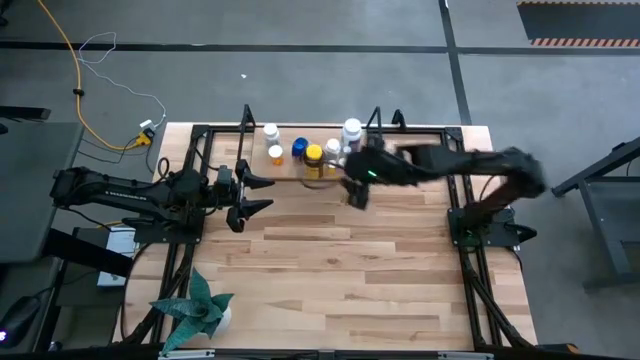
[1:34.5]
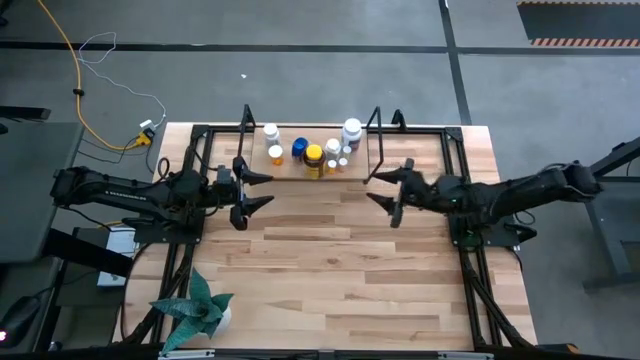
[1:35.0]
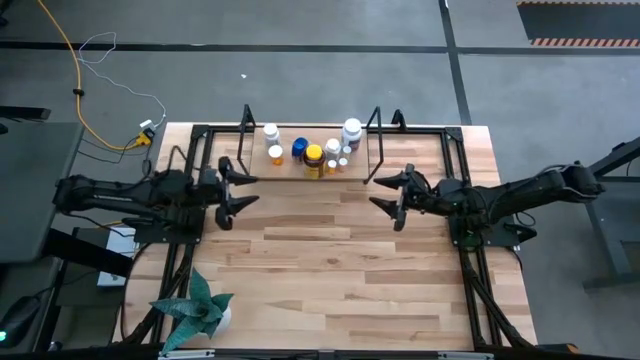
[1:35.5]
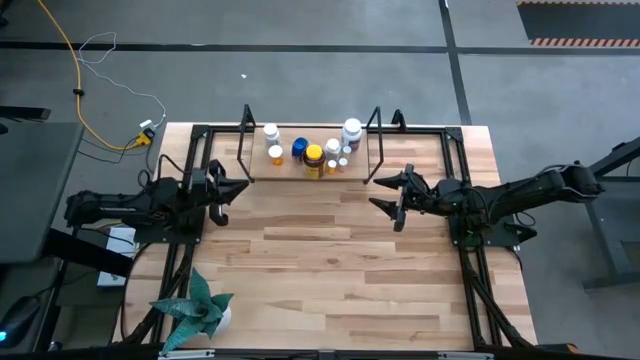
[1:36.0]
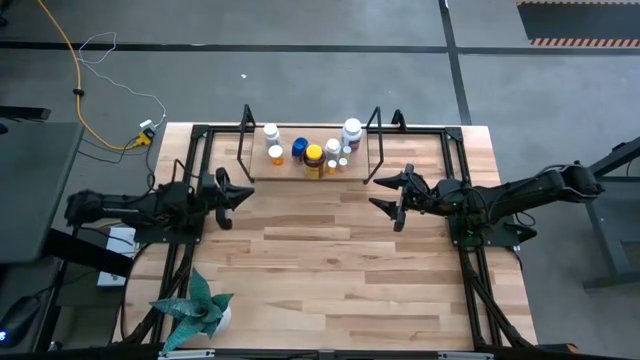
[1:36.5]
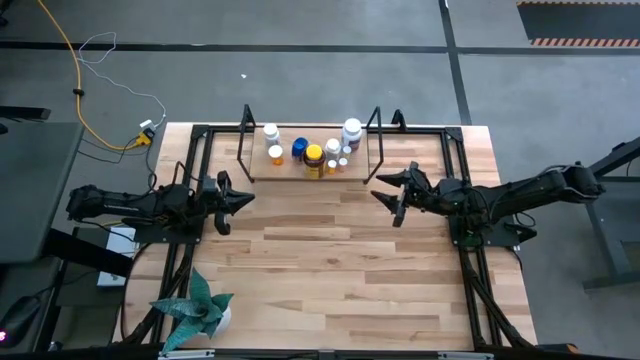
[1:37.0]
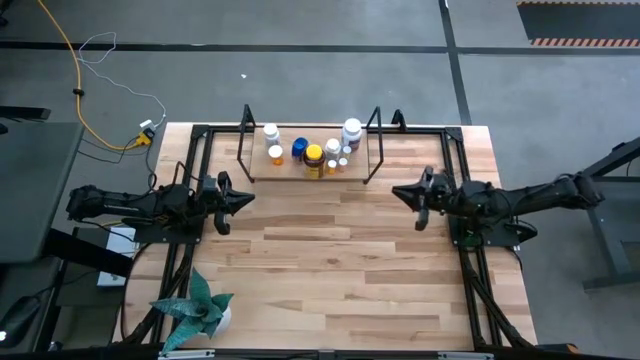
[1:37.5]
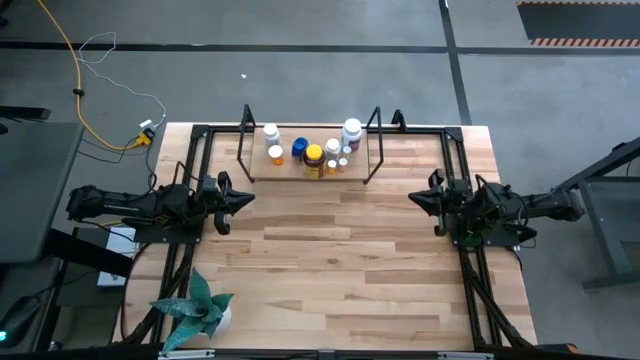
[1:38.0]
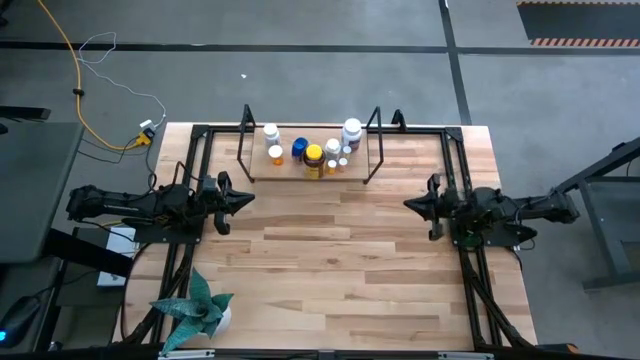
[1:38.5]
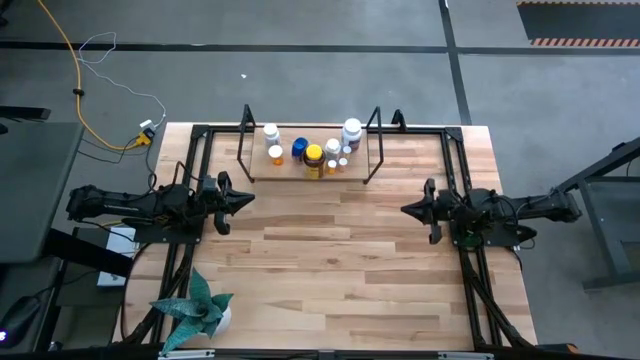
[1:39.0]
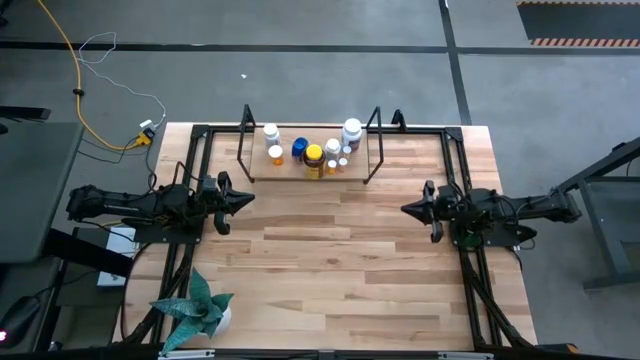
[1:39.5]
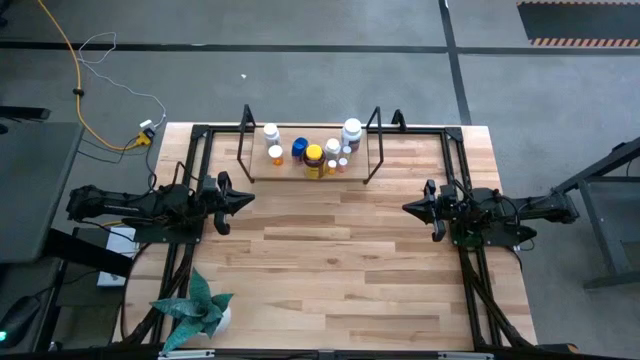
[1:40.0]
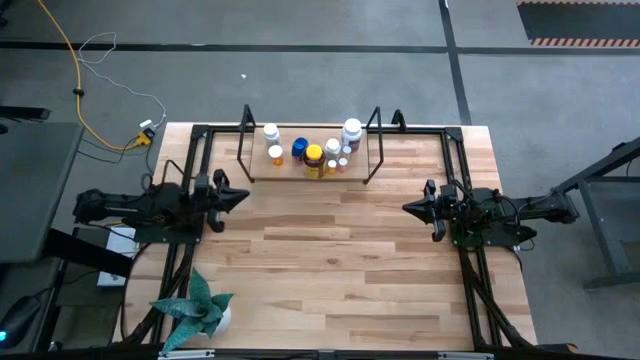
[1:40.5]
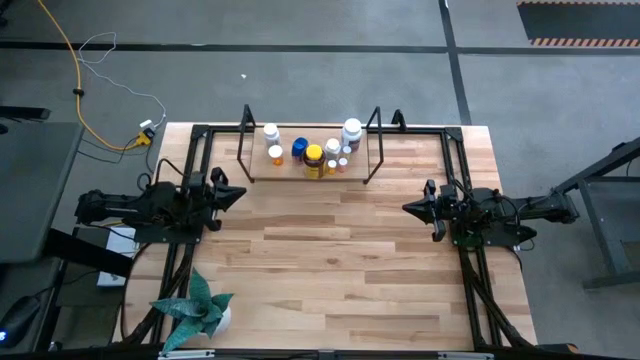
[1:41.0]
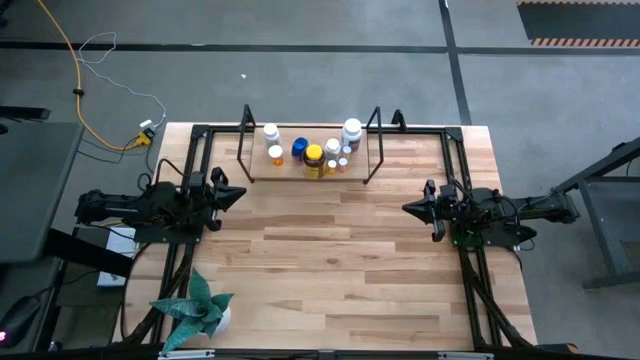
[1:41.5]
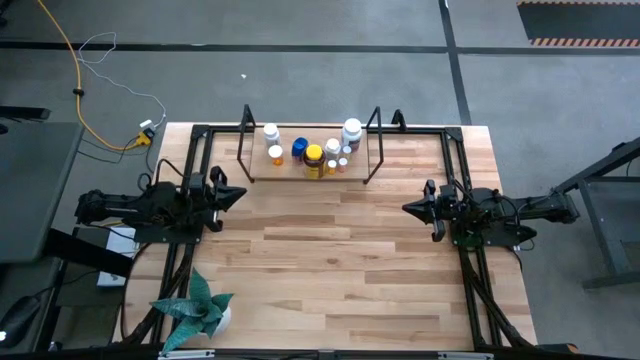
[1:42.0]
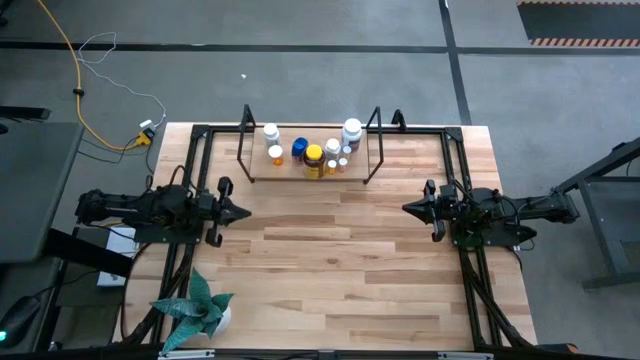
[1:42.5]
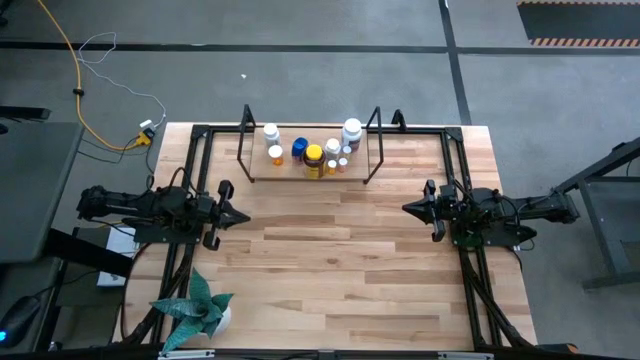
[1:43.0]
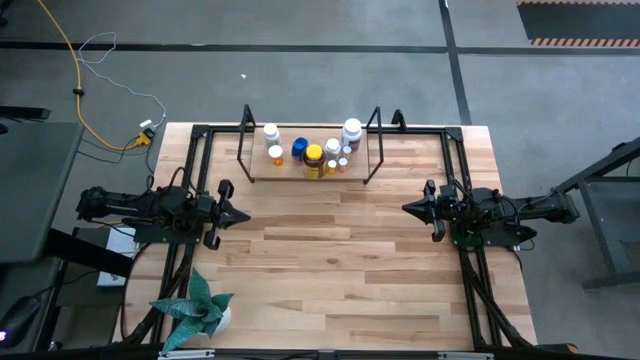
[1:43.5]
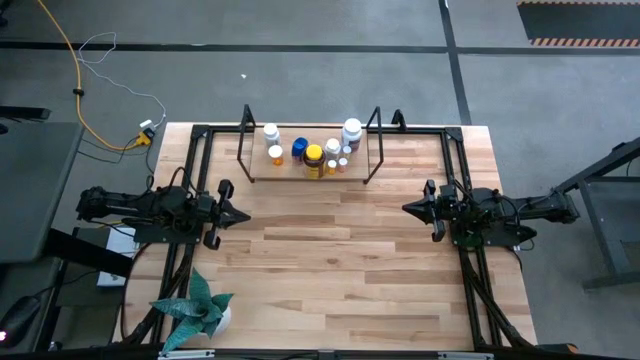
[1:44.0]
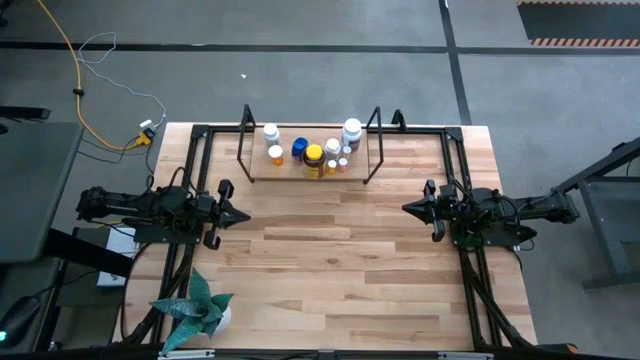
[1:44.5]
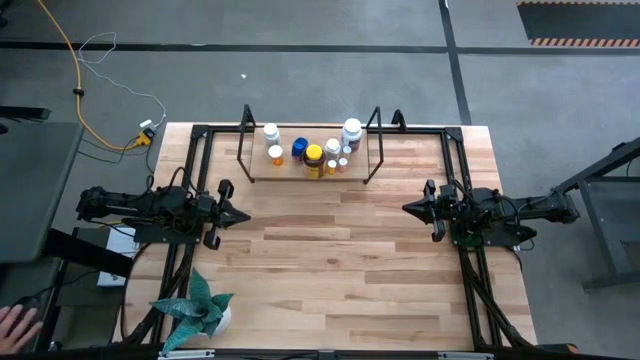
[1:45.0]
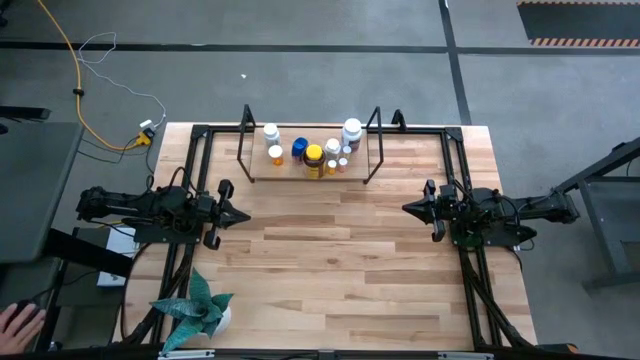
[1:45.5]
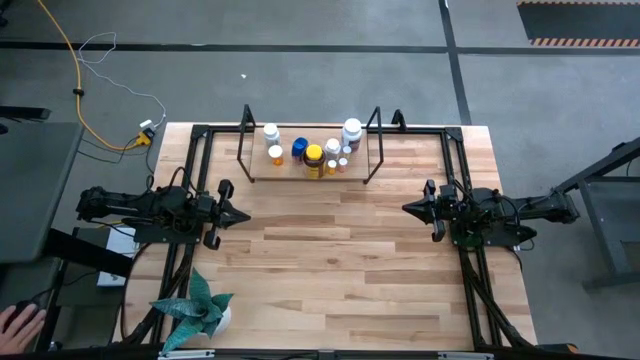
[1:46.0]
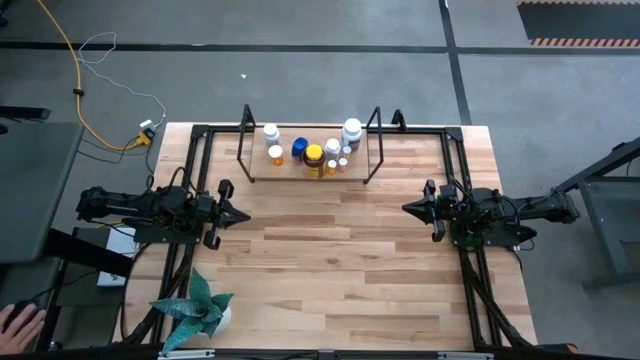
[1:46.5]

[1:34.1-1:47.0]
Task: Pick and place medicine bottles onto shelf by color
Return to Home Position

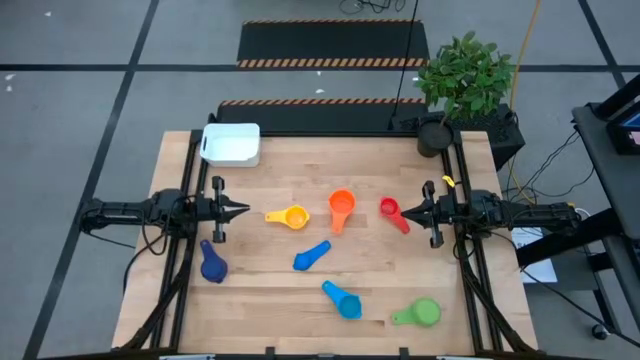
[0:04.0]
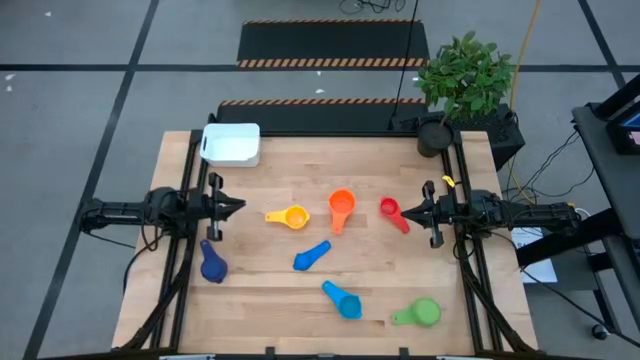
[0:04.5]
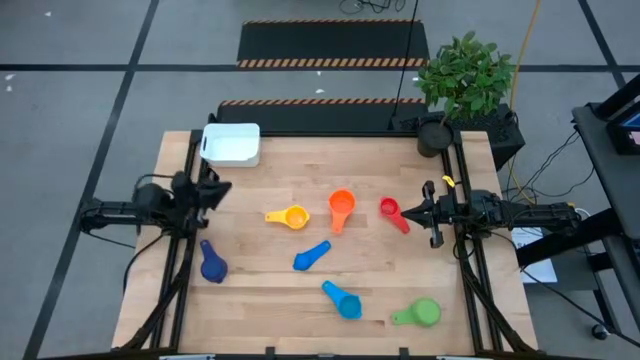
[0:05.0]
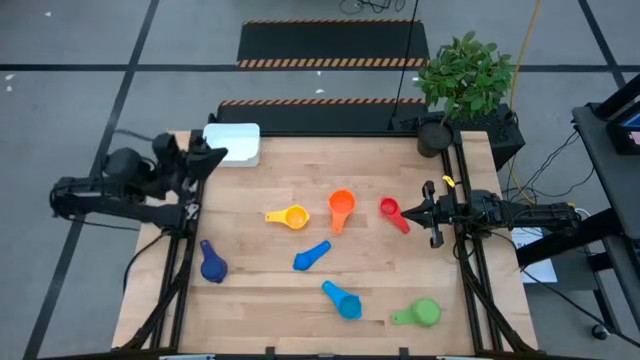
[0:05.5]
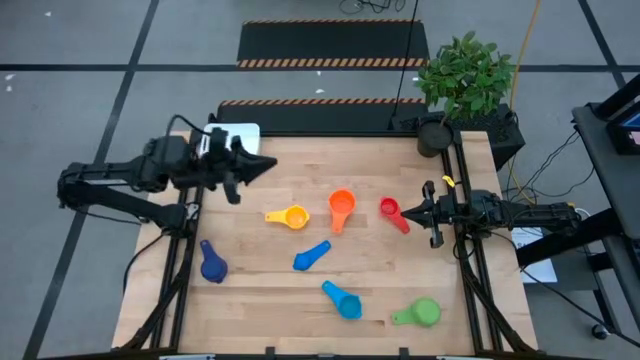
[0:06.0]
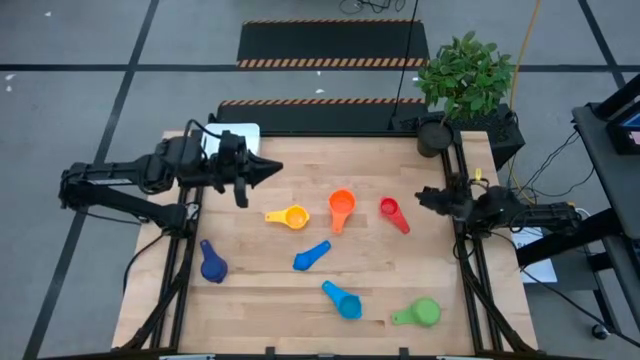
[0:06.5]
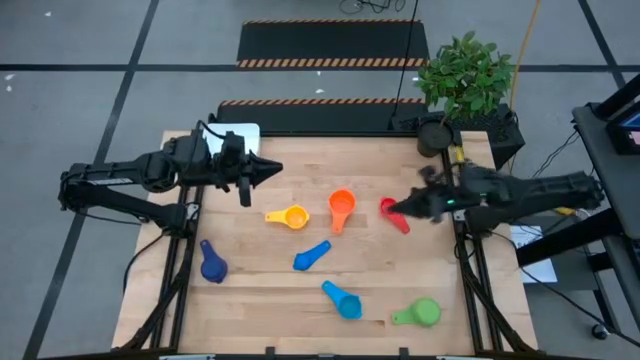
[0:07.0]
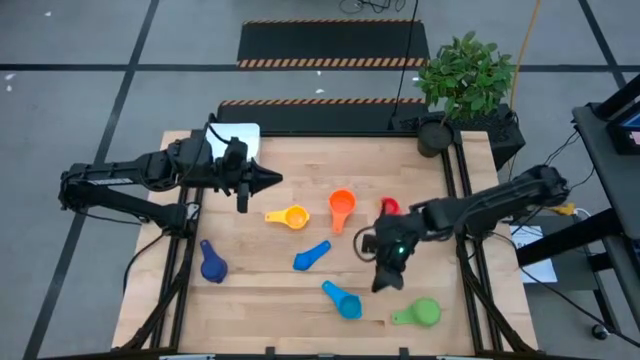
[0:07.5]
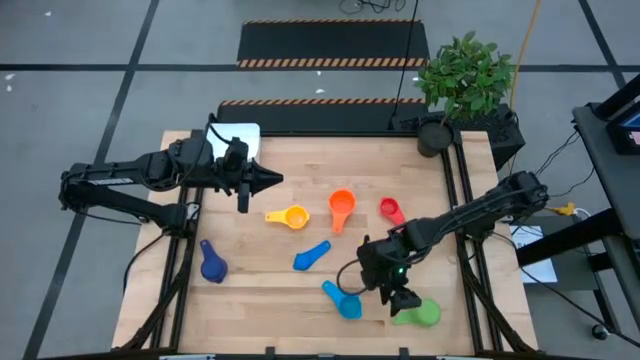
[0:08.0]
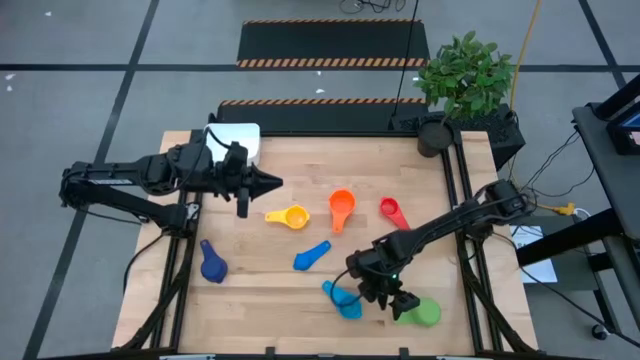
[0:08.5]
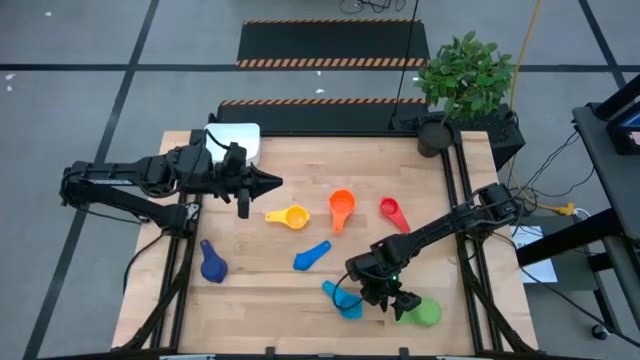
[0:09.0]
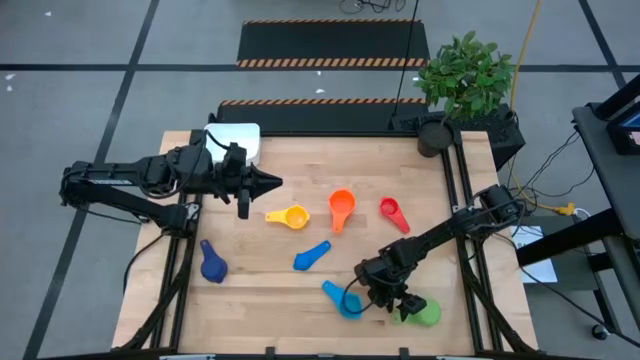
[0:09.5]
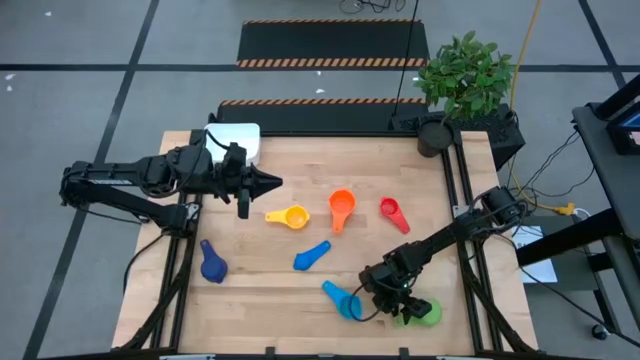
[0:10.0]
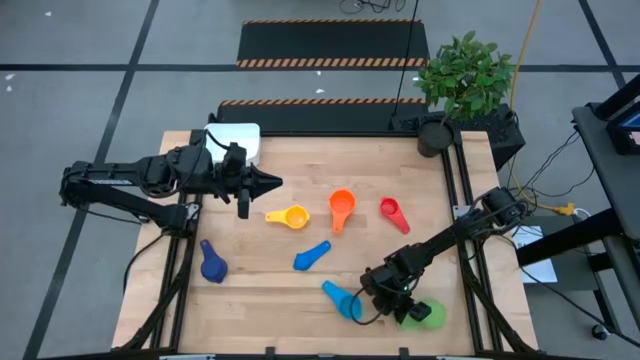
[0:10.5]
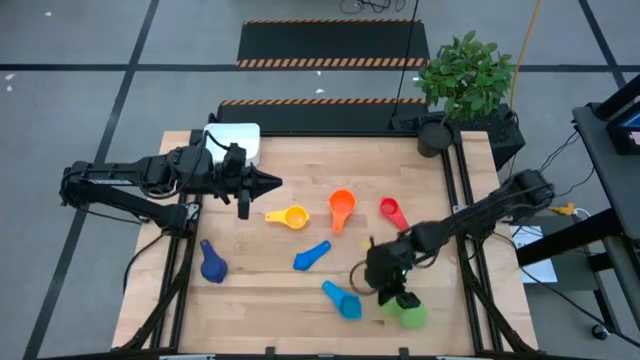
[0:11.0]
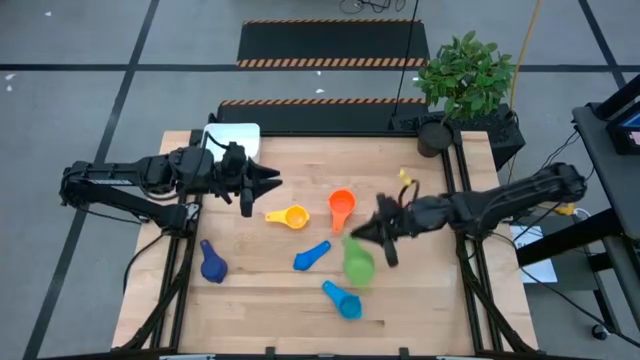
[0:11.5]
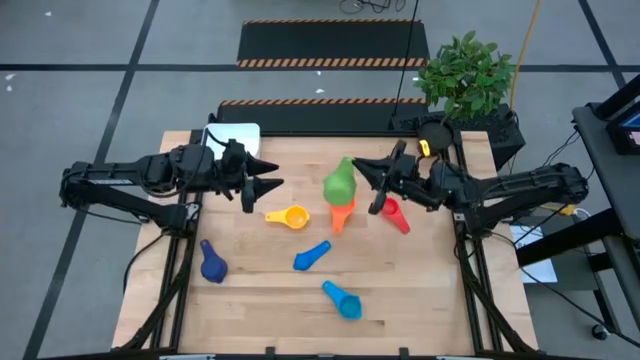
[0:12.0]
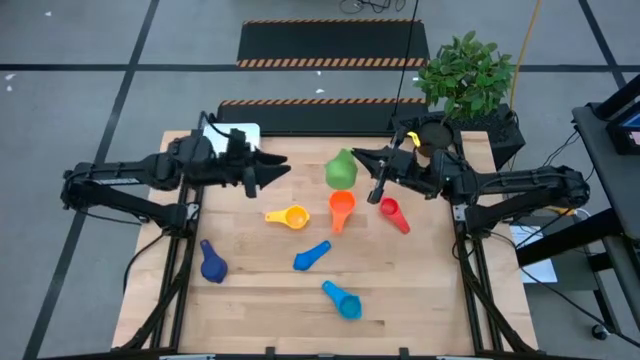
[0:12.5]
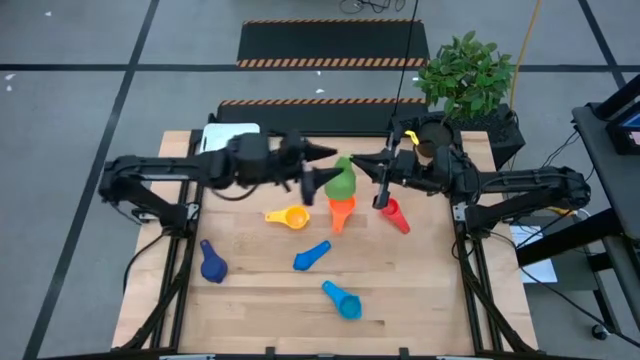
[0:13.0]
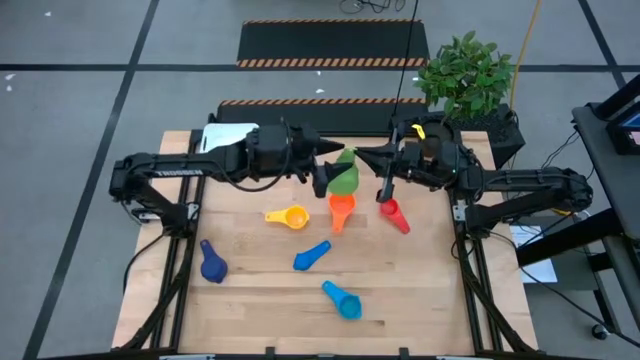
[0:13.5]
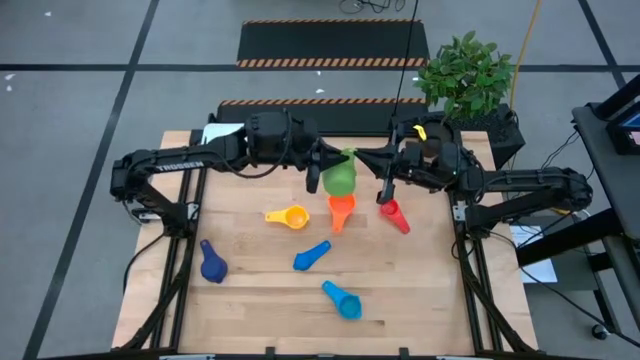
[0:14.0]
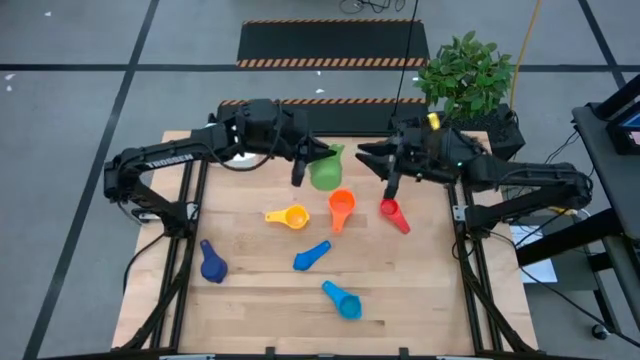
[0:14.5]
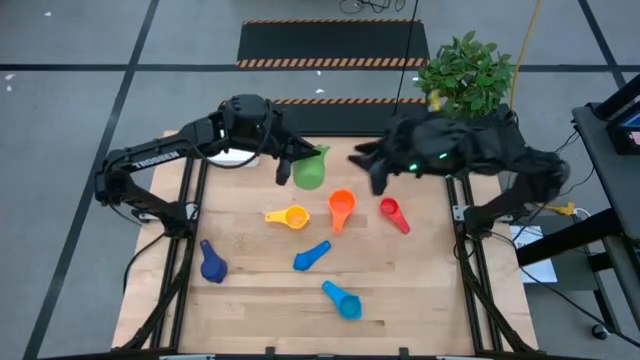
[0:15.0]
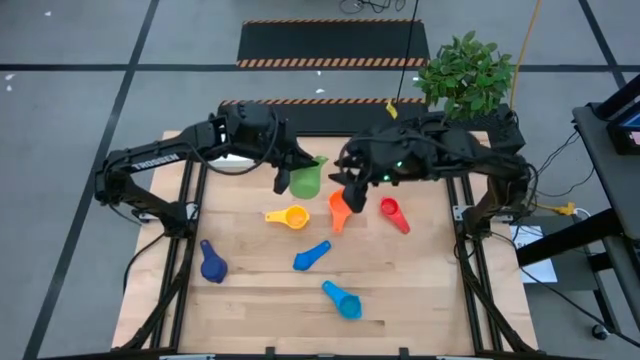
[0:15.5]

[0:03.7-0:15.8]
Task: Nest measuring cups in basket
Stack the green measuring cup into the orange measuring cup
